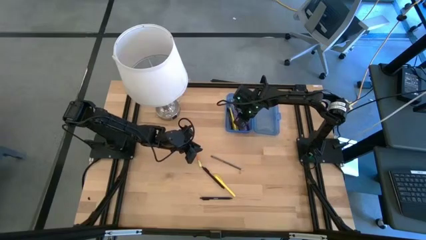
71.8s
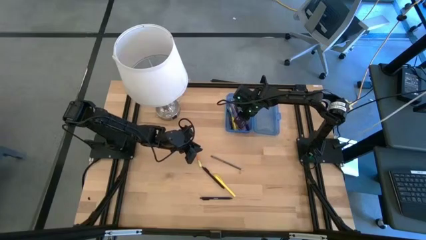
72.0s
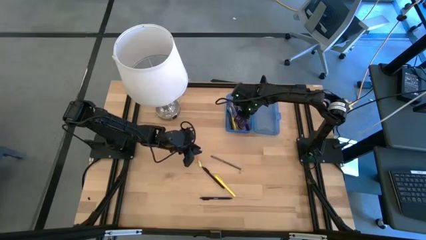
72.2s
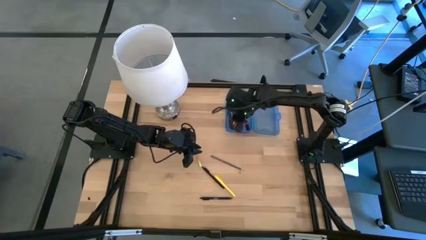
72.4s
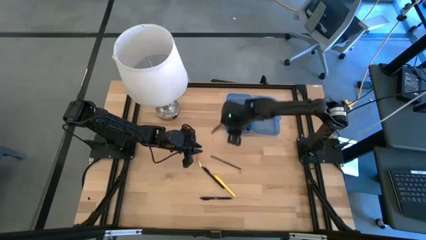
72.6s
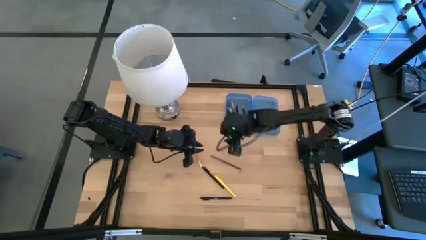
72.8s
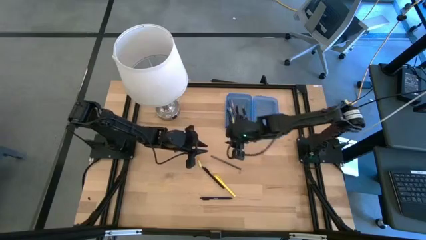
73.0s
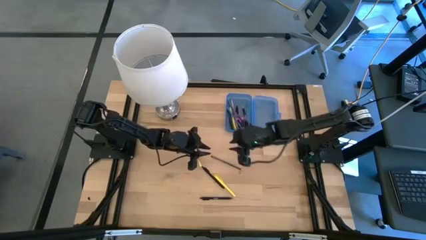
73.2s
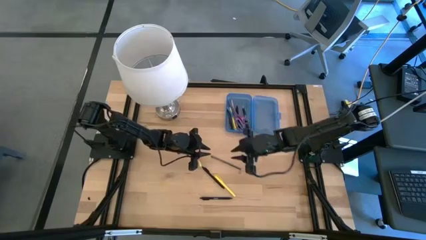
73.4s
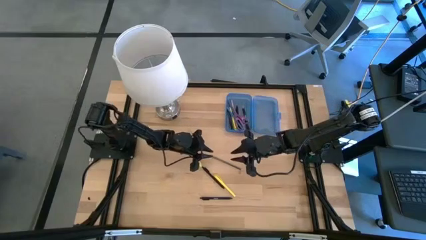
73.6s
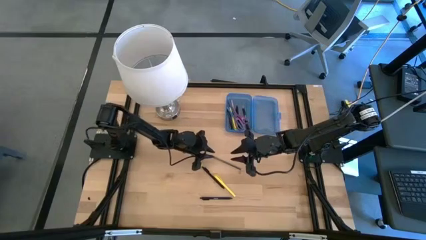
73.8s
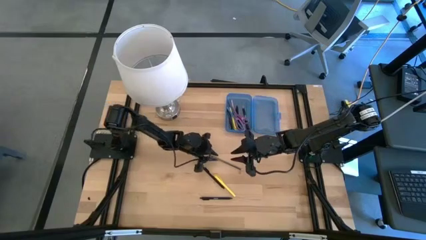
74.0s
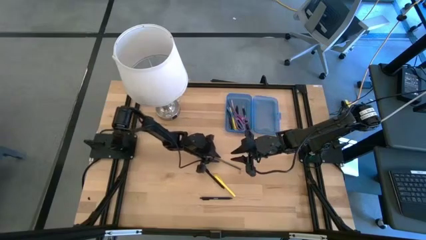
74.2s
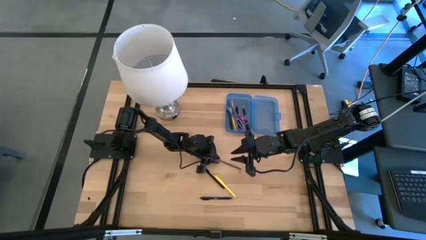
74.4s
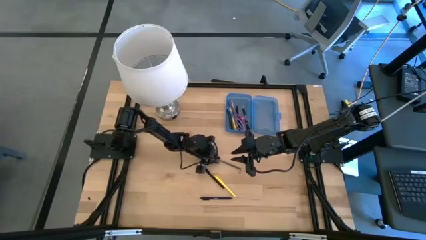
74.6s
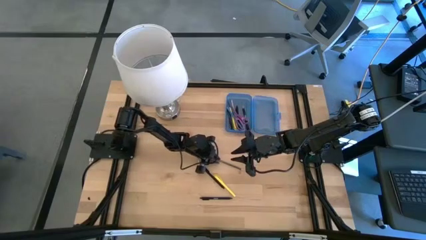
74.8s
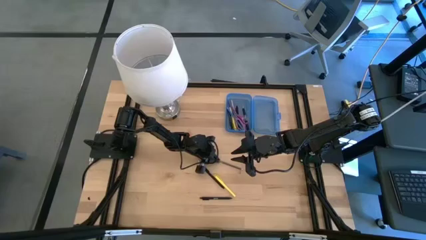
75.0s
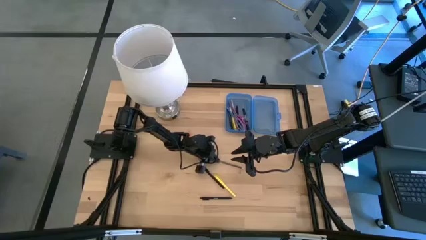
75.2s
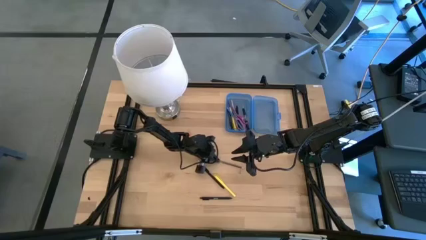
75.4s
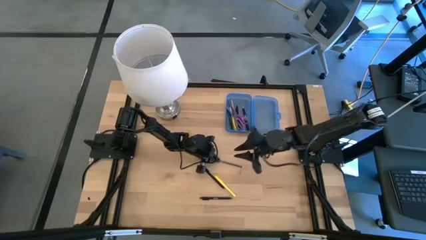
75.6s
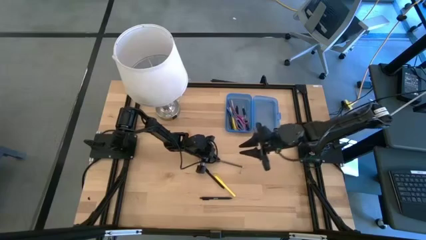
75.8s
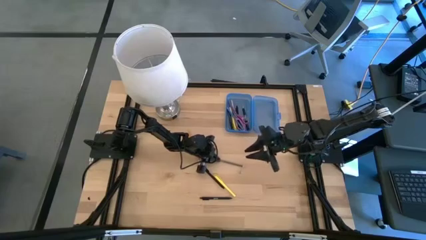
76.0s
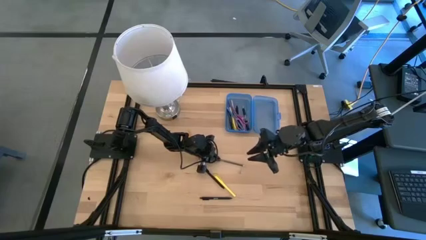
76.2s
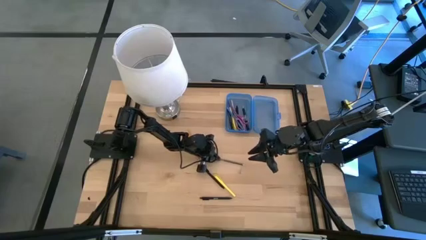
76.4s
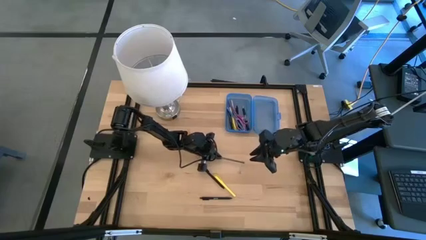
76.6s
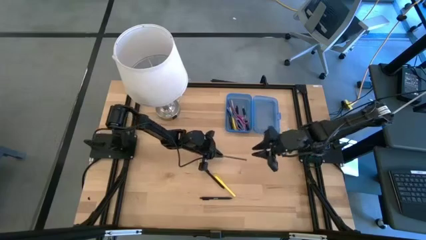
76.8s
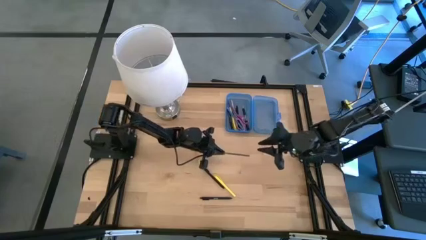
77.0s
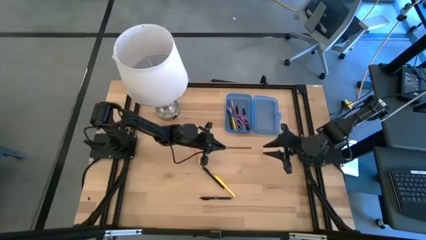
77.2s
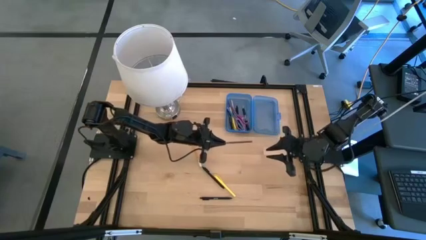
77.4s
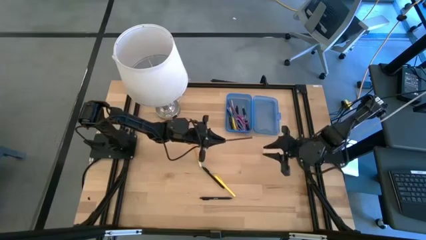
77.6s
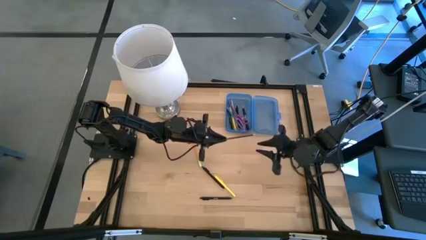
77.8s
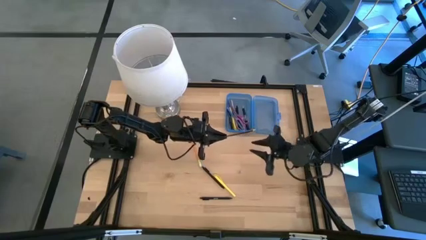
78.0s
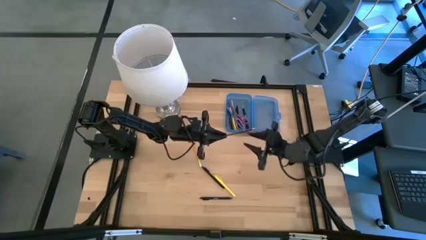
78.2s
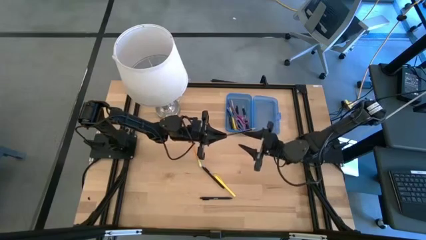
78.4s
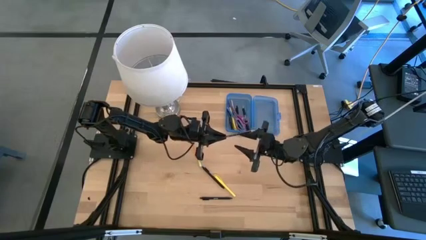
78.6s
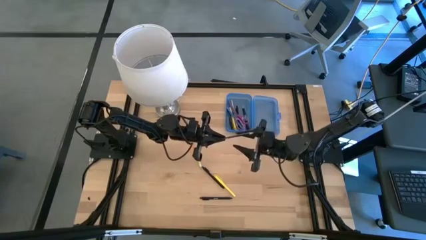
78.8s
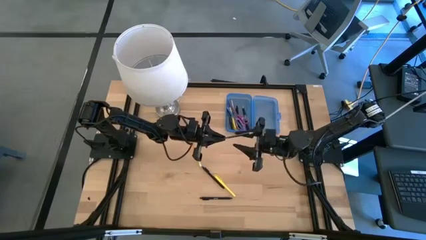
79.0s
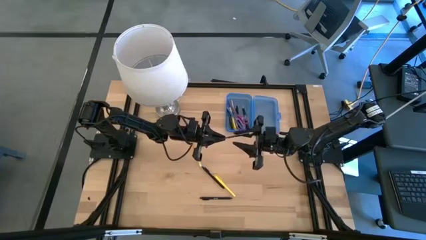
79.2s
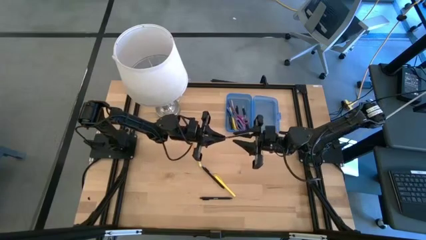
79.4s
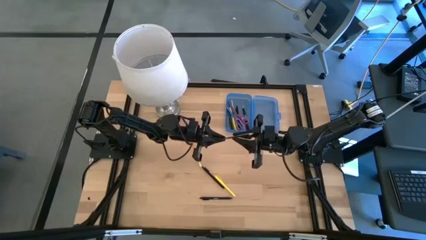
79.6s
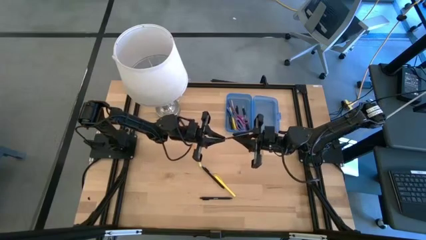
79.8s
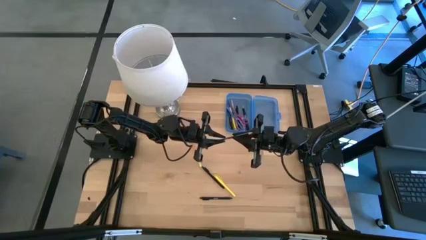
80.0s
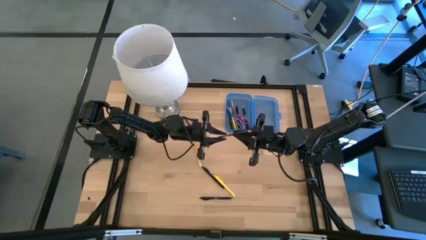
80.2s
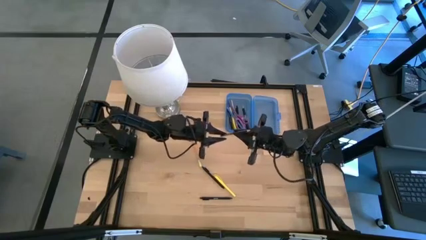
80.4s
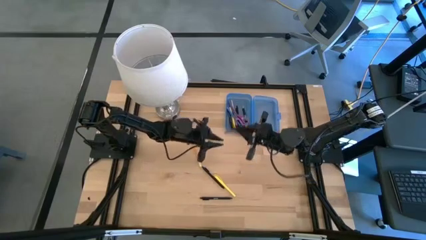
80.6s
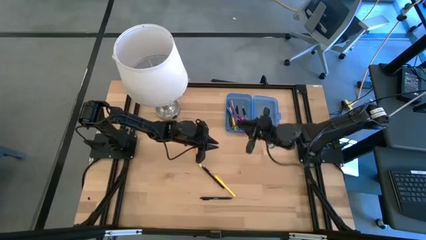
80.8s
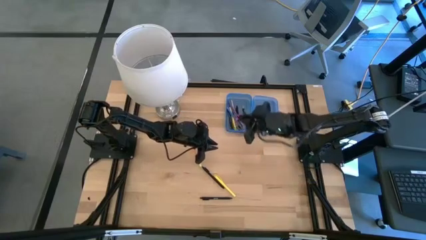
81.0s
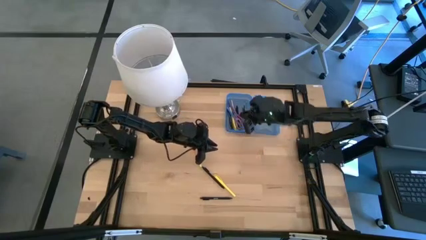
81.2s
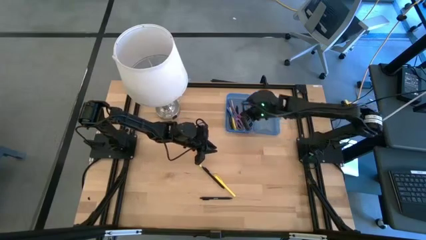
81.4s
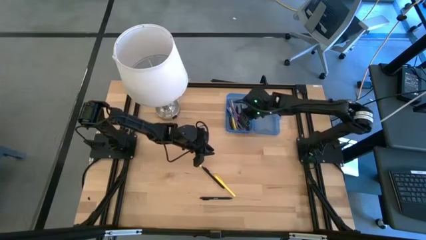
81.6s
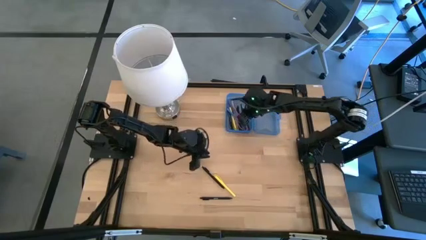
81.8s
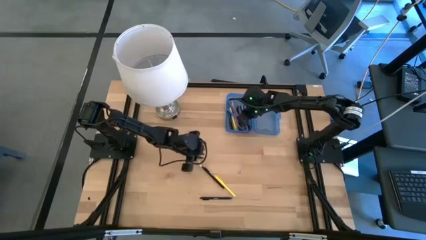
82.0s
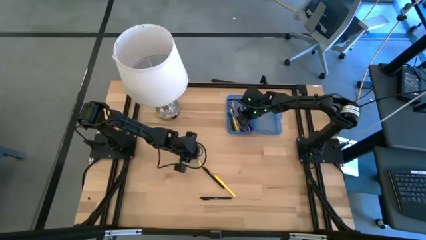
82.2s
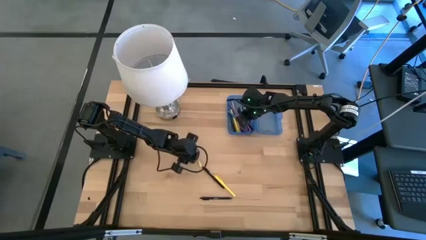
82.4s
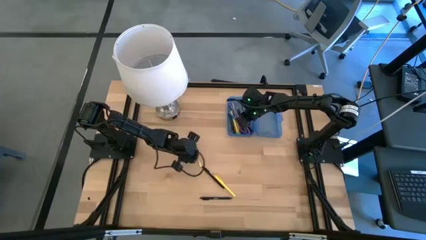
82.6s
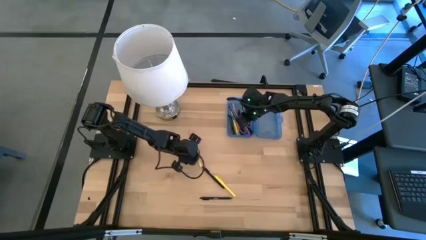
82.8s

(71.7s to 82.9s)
Task: Pick & place school supplies into a supply box
Put the black pencil into the blue supply box

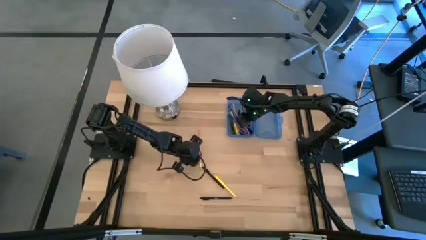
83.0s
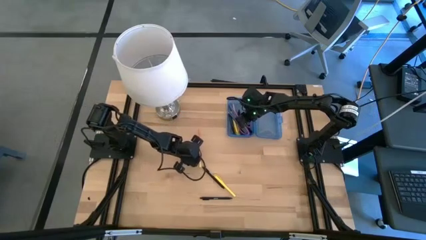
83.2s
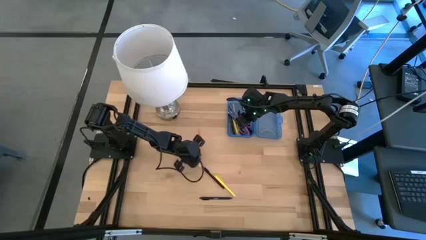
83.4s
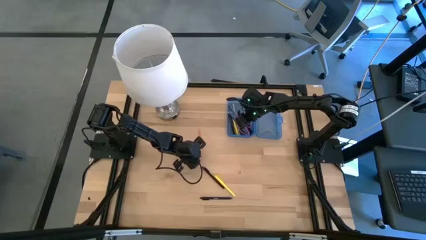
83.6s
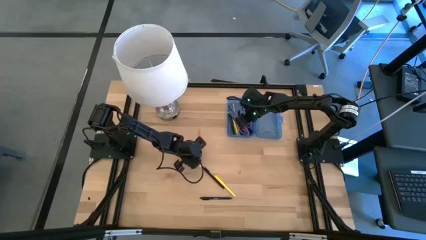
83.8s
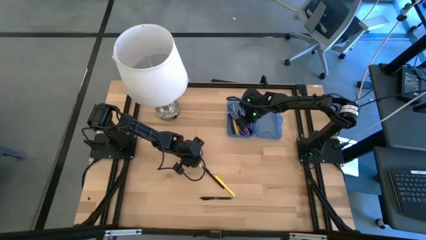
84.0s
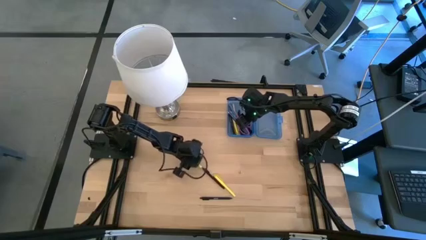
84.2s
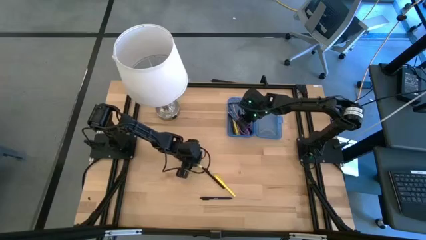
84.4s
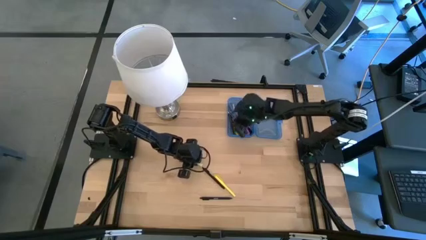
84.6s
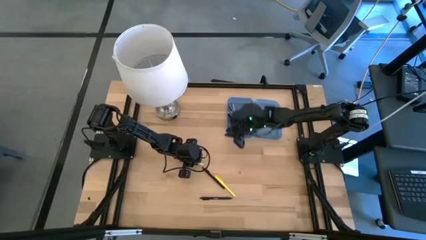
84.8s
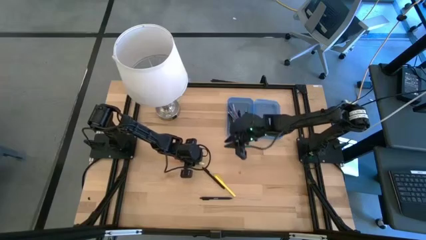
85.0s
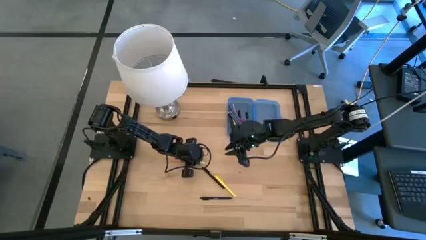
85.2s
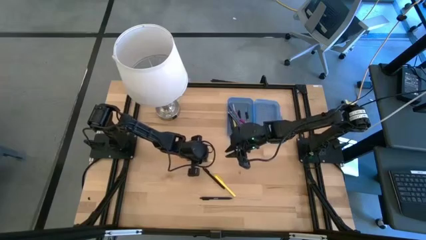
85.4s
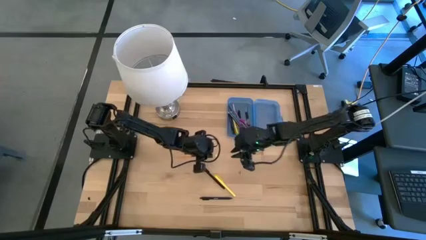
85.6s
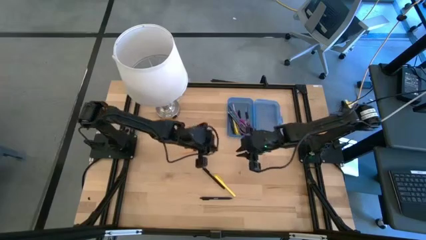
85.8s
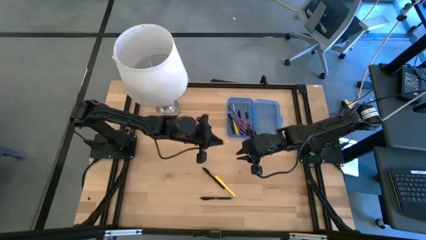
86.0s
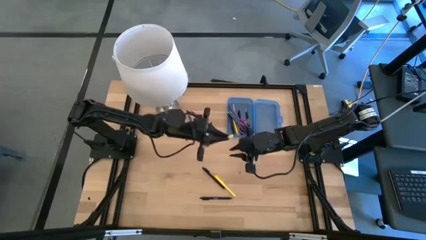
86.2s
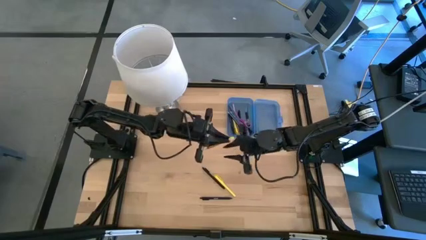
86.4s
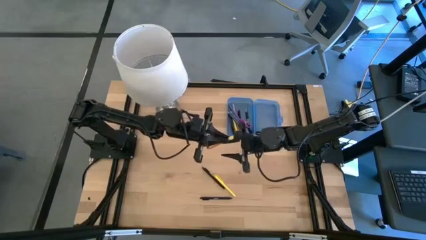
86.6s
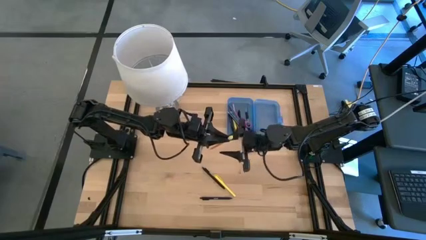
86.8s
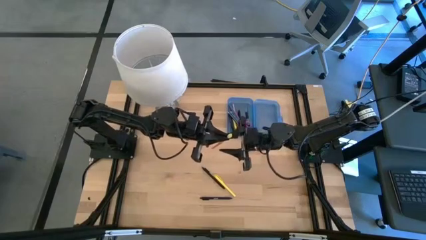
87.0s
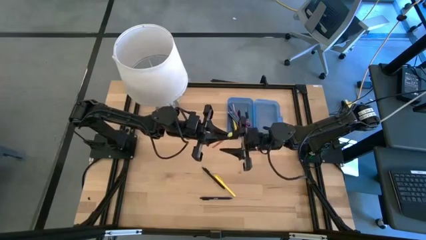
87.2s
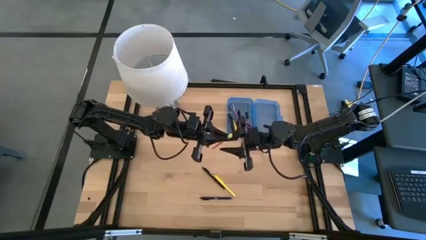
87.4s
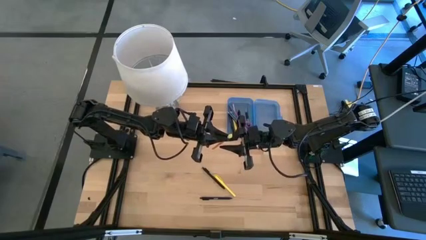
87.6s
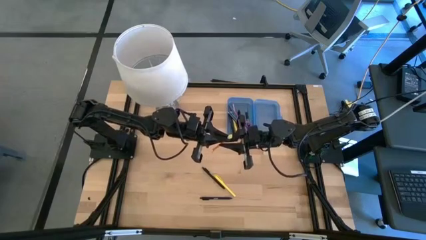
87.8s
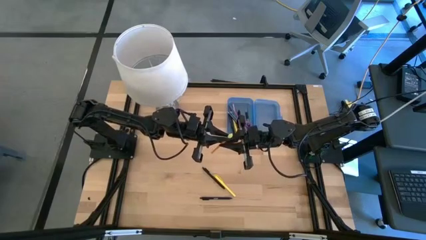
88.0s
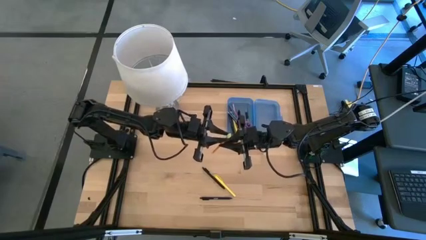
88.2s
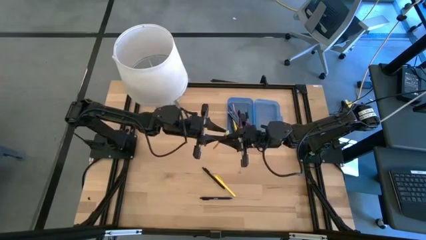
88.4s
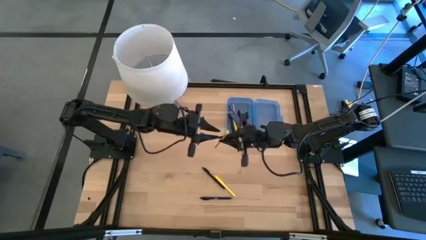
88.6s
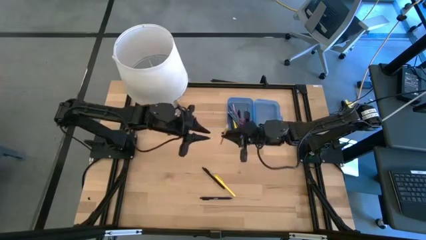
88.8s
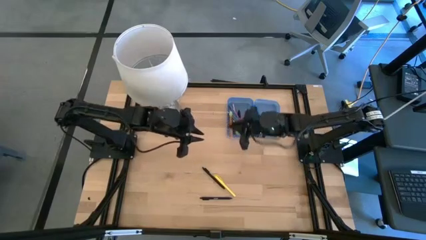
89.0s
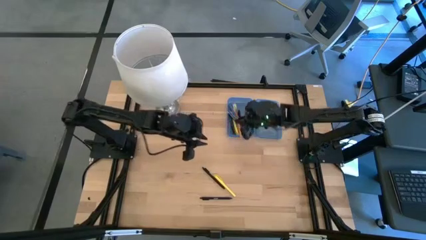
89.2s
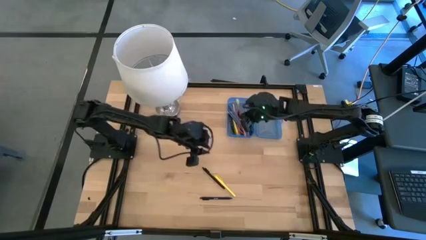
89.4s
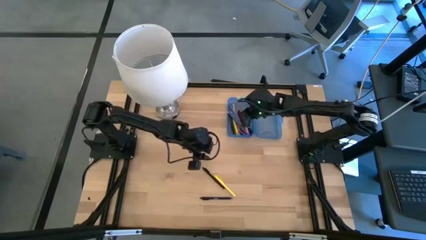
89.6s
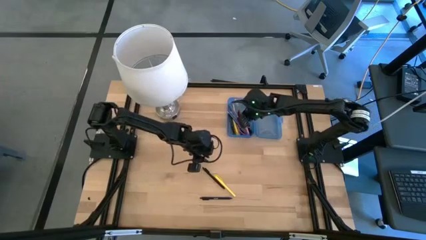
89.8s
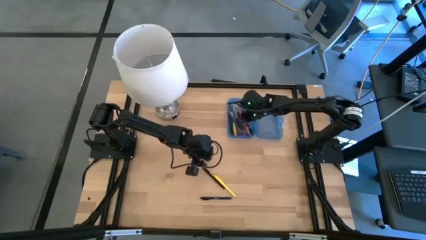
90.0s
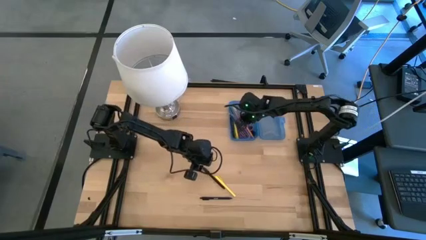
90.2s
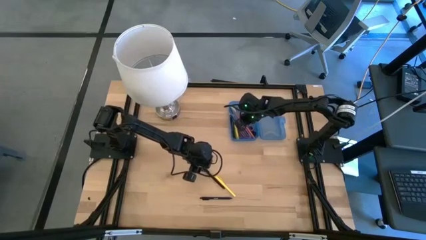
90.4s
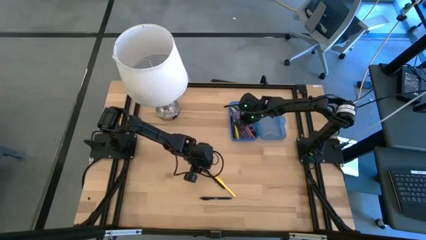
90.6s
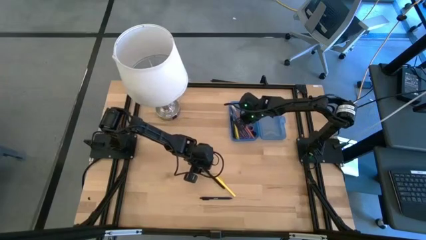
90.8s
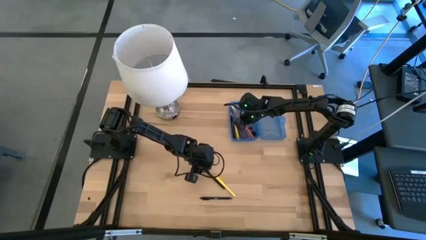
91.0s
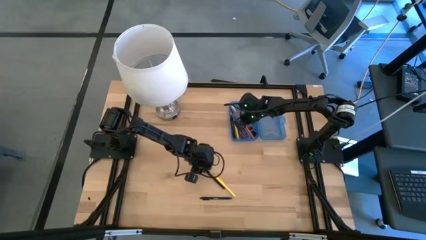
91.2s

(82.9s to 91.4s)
Put the orange pencil into the blue supply box
